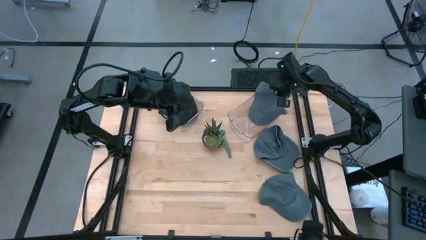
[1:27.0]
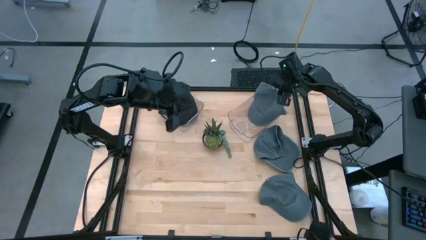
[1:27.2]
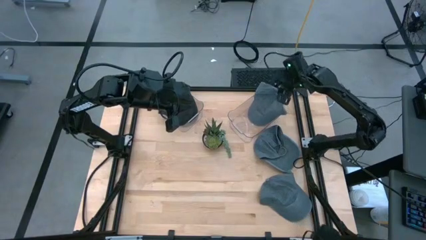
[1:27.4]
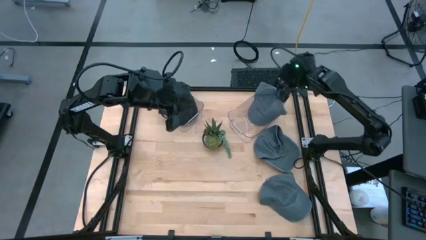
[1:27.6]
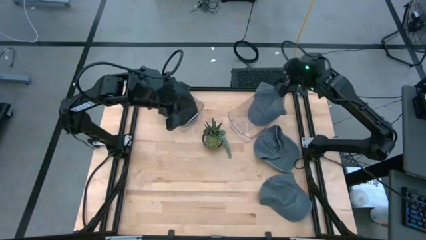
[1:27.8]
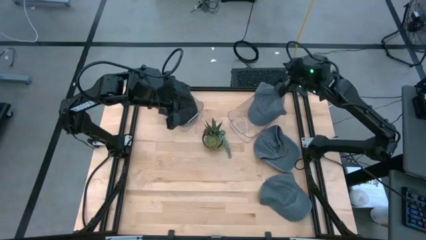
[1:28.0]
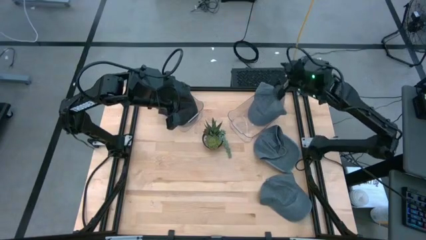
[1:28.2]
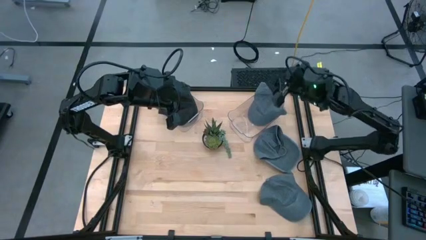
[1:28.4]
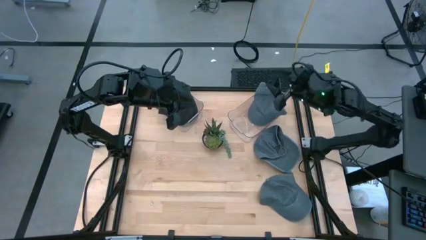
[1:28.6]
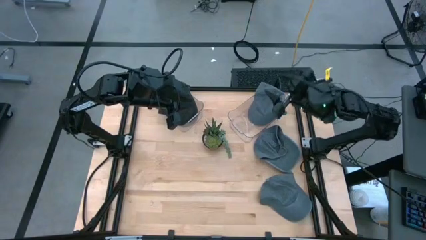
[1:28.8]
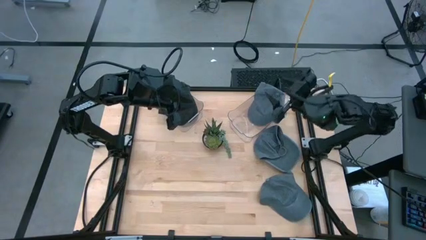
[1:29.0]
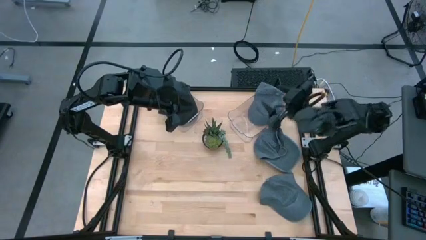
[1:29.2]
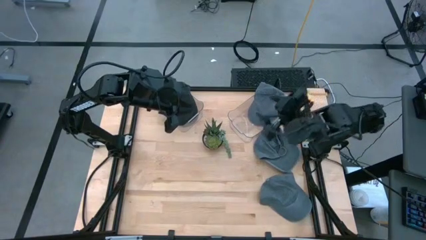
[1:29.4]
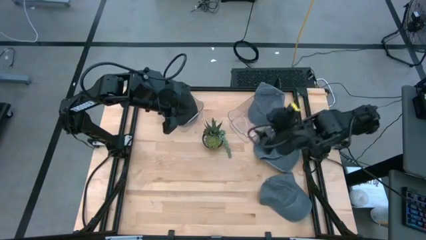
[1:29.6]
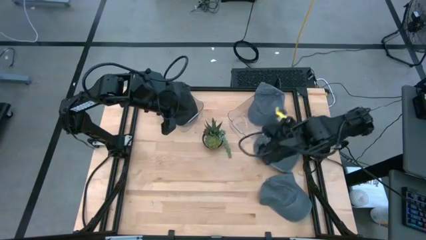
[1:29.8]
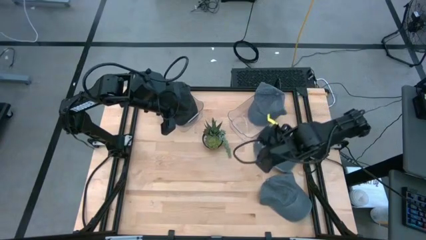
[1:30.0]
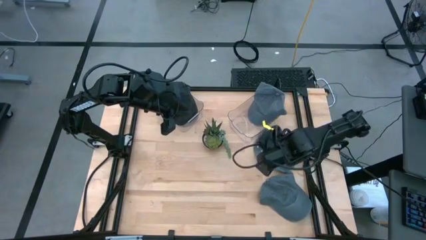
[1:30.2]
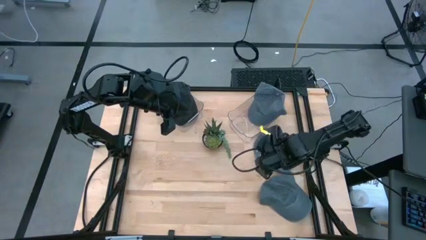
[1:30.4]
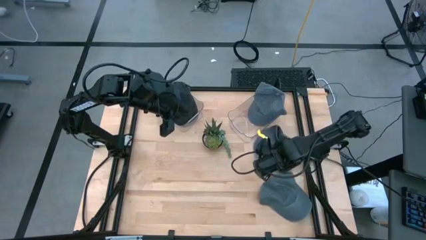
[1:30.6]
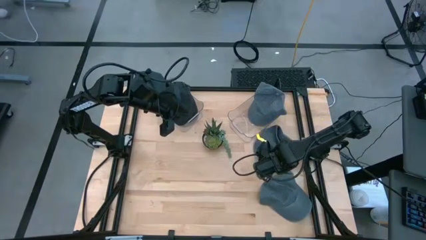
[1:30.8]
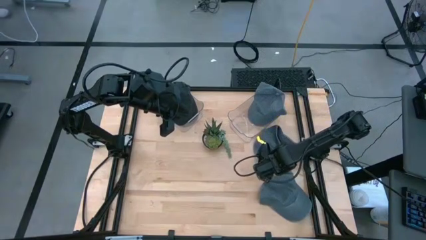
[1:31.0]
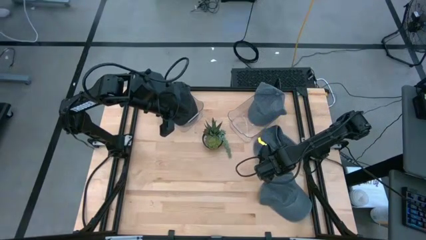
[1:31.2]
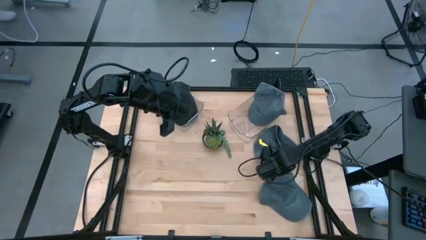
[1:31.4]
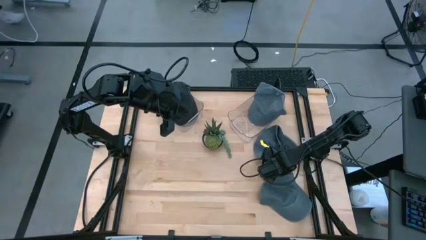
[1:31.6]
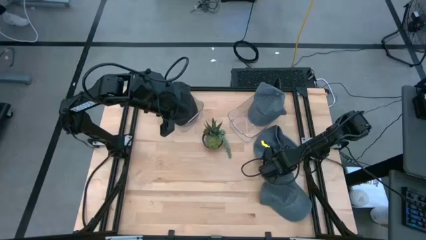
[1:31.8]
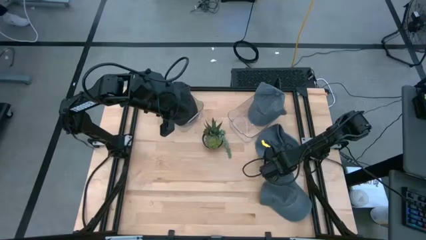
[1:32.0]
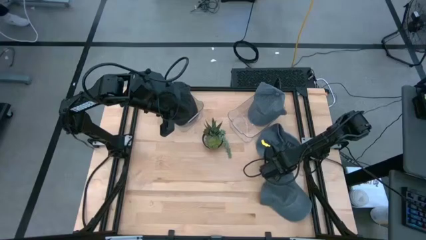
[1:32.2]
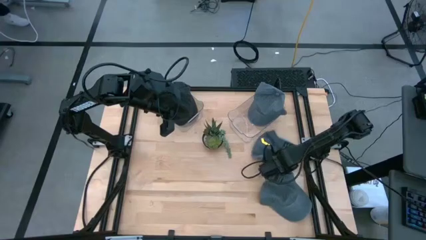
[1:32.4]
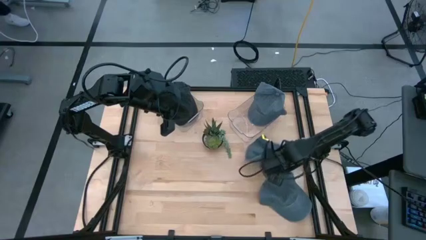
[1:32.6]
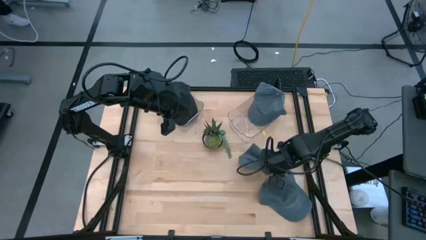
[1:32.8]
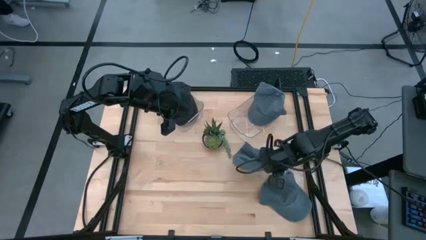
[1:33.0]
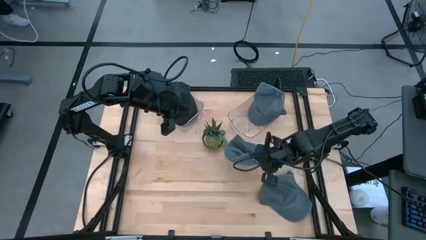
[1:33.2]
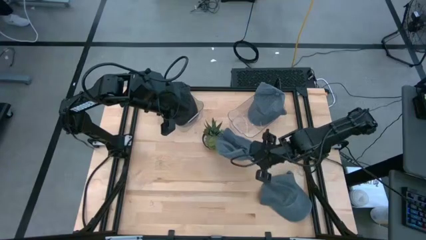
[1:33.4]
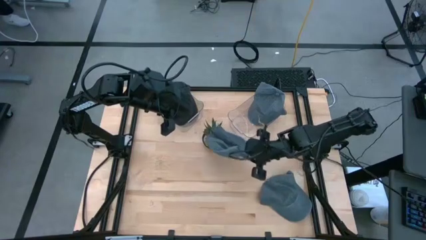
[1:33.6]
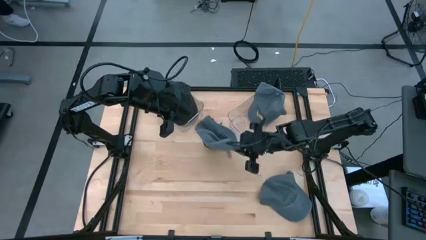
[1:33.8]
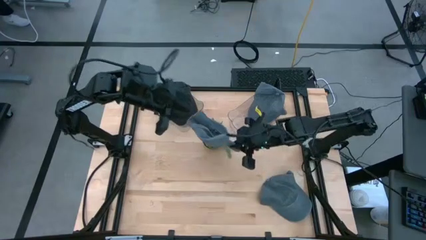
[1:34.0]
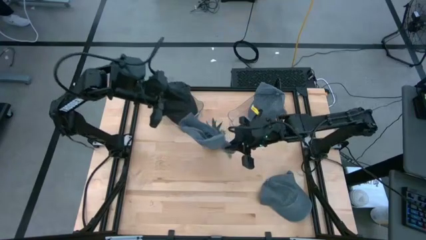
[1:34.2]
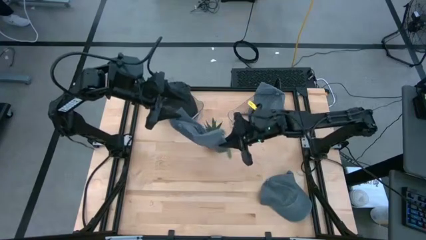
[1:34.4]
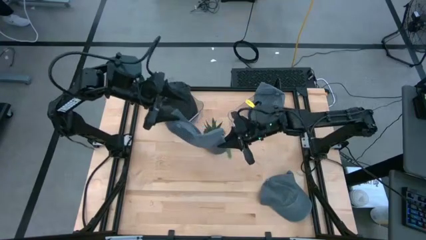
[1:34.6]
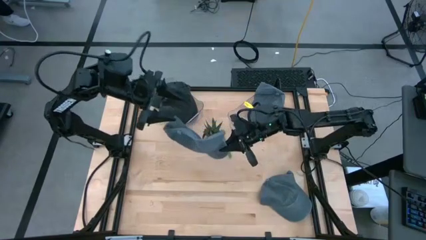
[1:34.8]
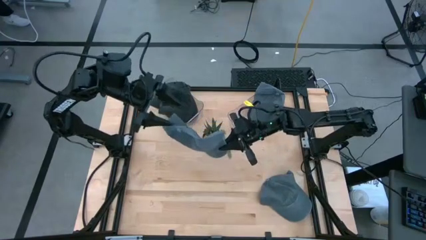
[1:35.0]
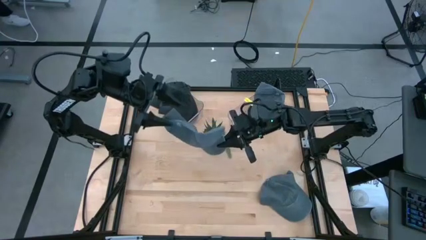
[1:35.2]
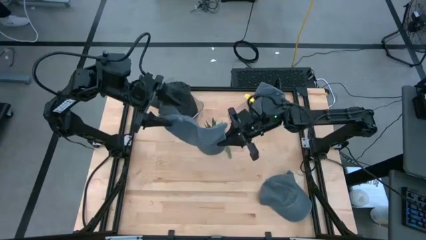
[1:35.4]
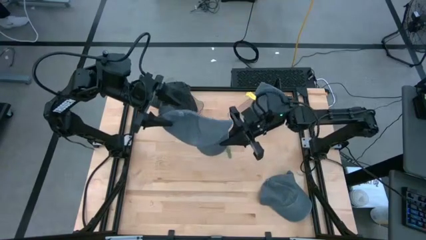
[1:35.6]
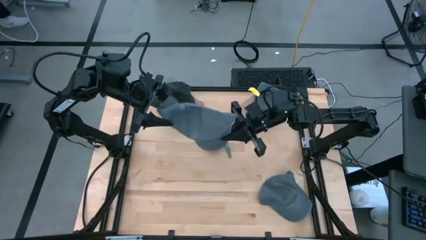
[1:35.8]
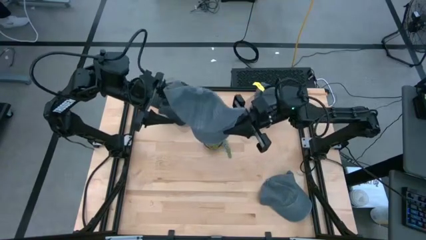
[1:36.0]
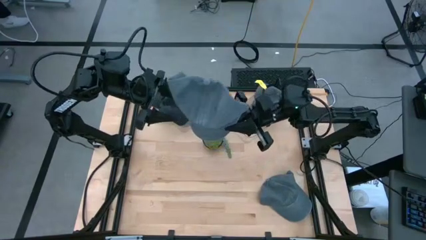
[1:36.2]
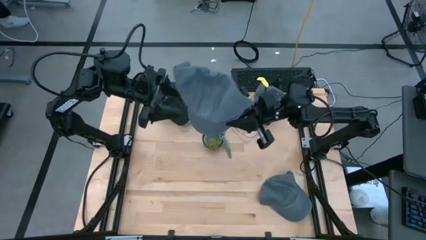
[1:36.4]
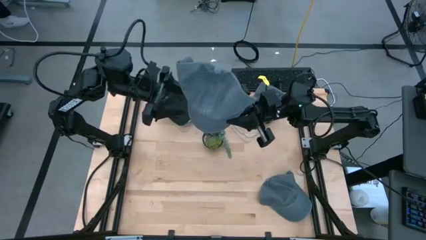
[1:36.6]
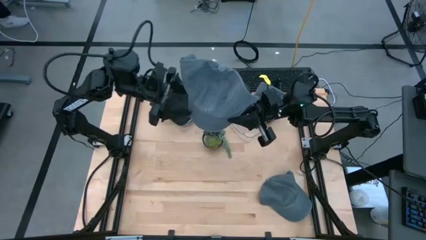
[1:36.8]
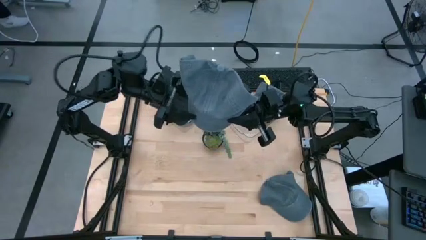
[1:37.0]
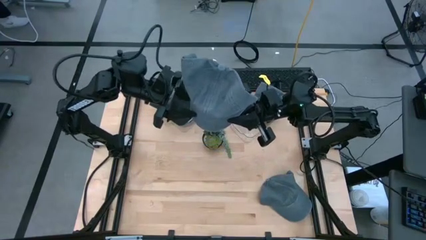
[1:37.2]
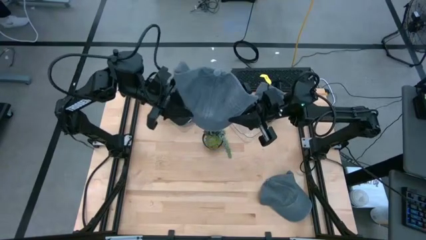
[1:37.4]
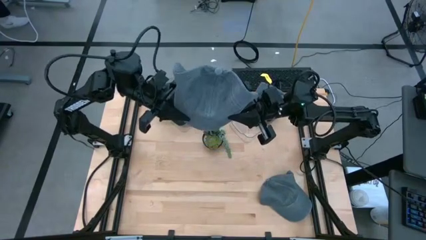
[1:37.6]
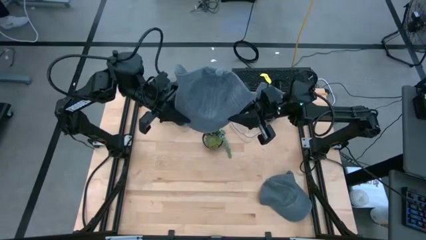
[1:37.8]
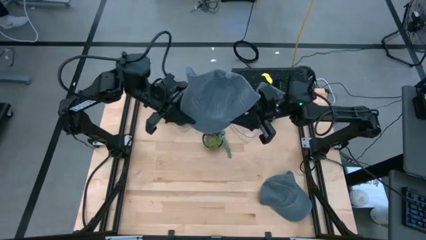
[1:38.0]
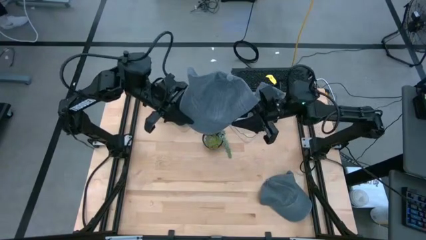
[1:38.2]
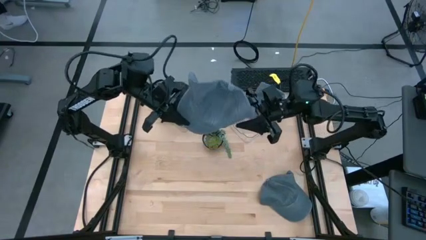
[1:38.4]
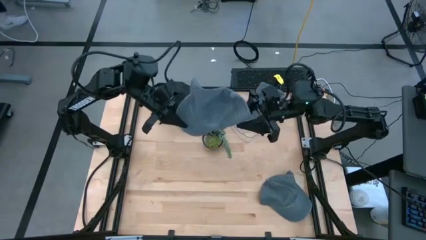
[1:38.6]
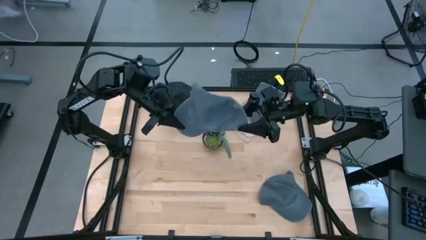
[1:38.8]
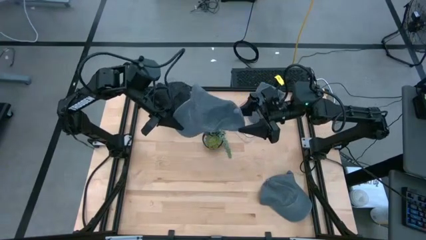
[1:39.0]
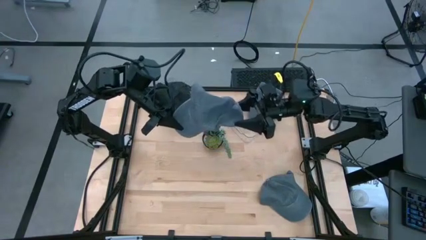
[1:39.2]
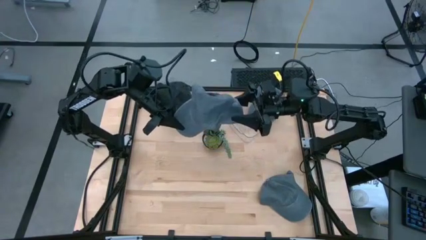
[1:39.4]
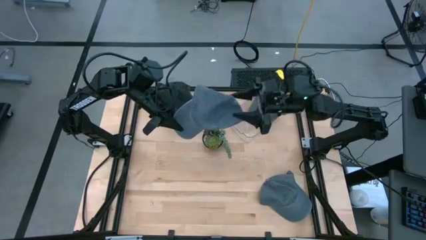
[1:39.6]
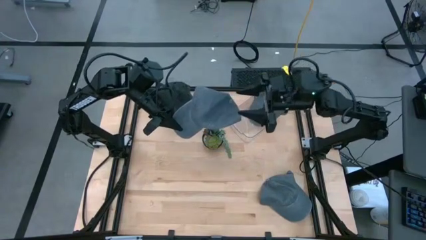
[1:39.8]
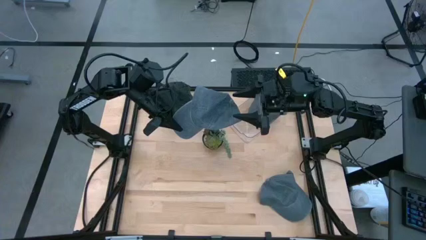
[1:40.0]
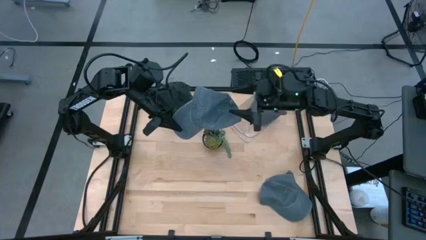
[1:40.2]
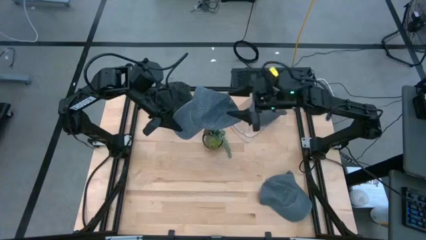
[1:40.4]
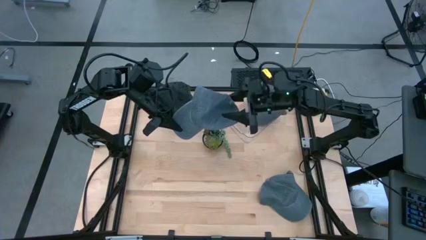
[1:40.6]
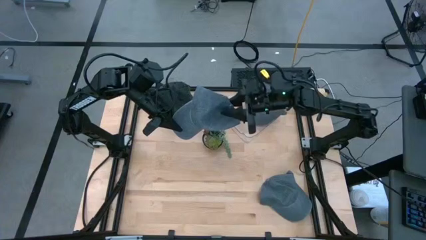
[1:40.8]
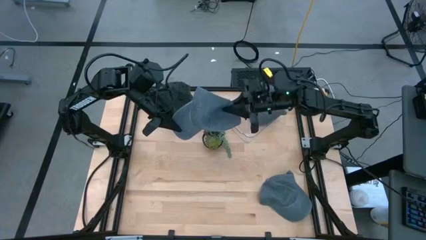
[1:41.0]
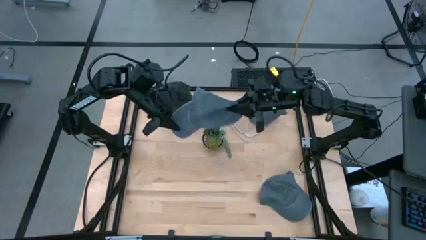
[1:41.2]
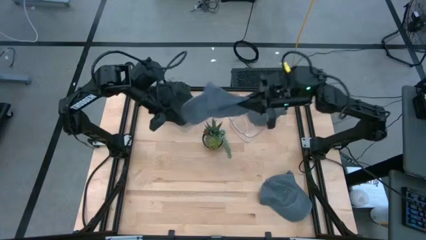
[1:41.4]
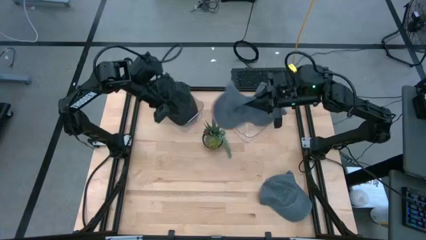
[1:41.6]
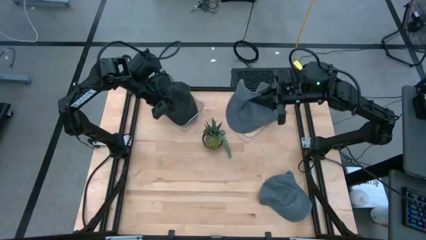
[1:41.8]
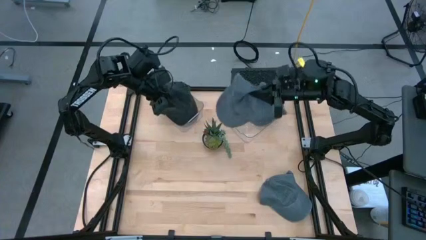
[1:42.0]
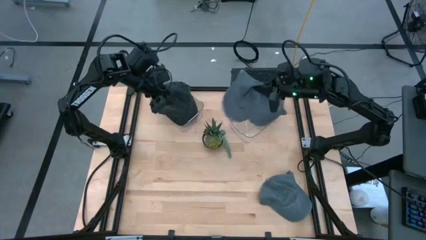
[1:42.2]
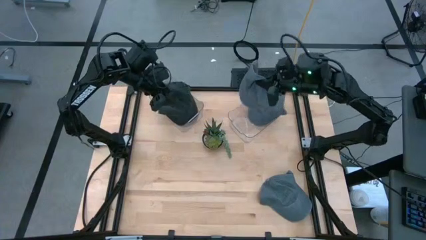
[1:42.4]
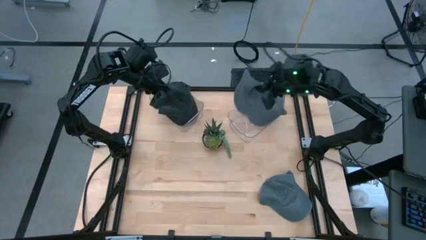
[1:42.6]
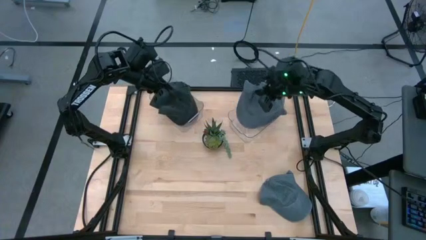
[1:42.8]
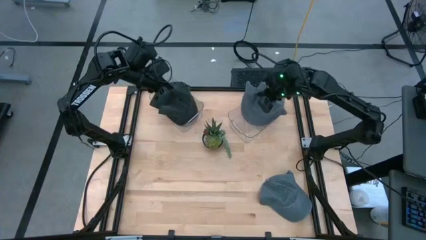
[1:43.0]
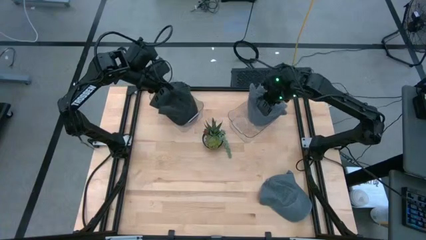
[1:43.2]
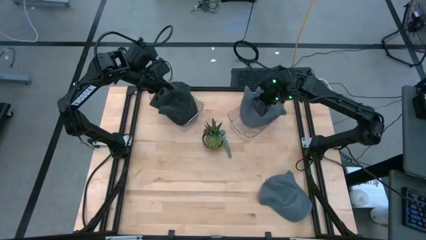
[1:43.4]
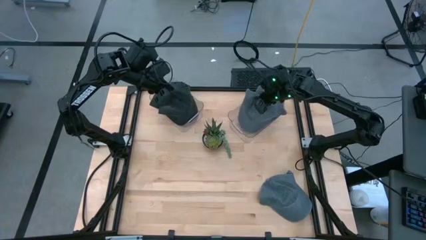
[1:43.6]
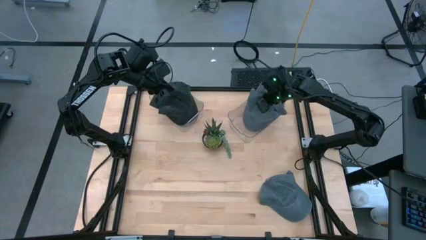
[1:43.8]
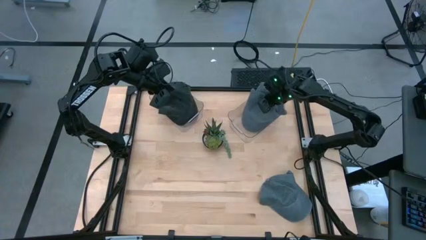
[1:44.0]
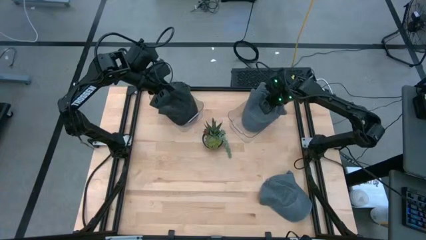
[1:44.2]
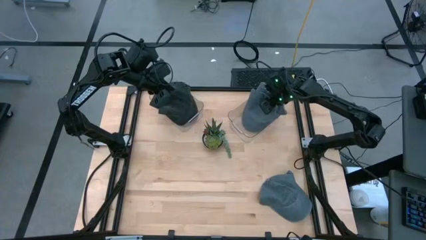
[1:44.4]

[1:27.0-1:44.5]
Task: Pick & Place hat
Put the top blue cap into the right transparent bin
